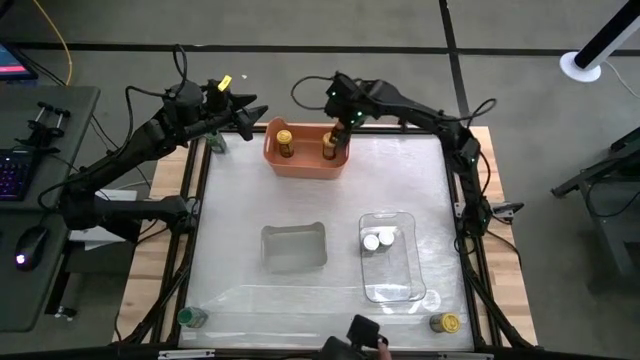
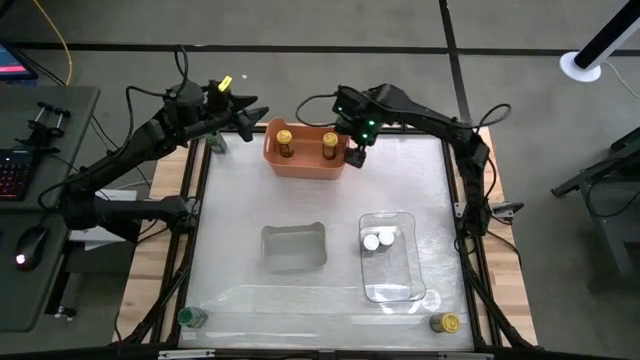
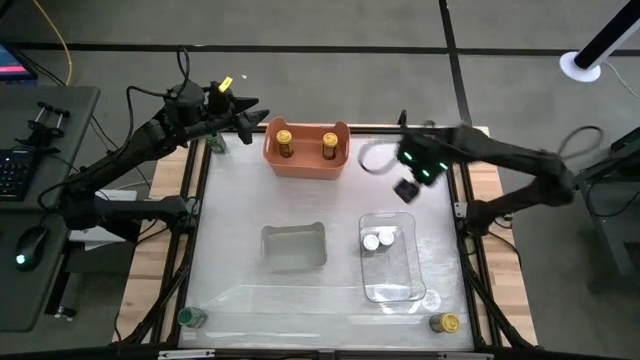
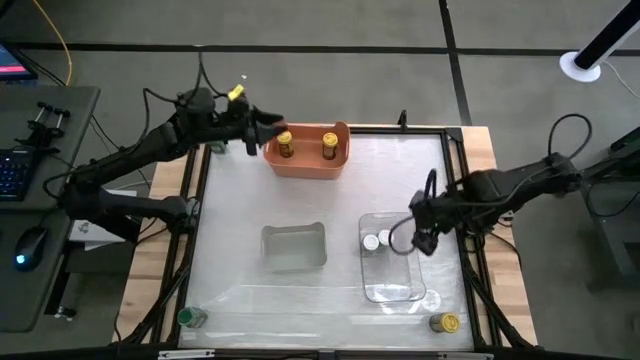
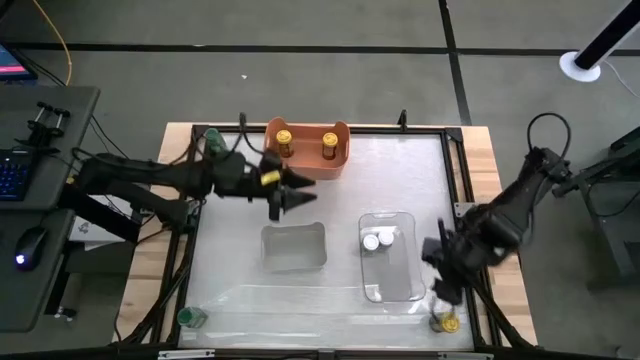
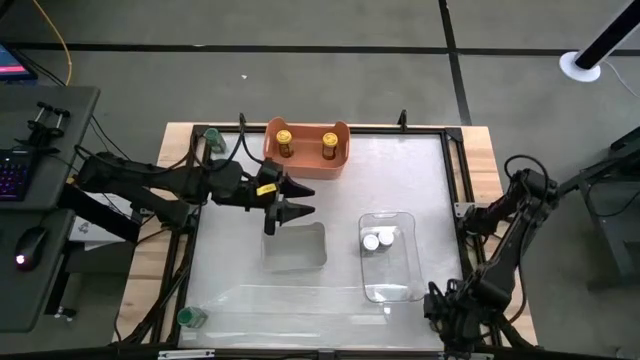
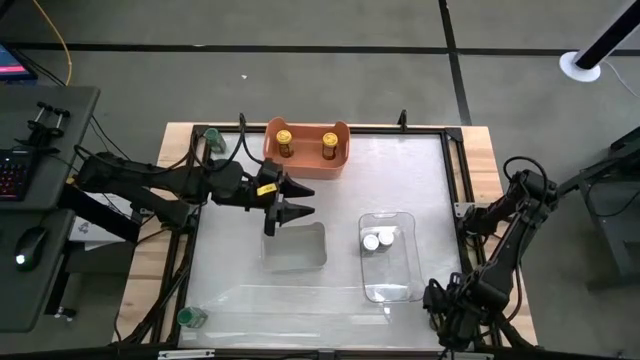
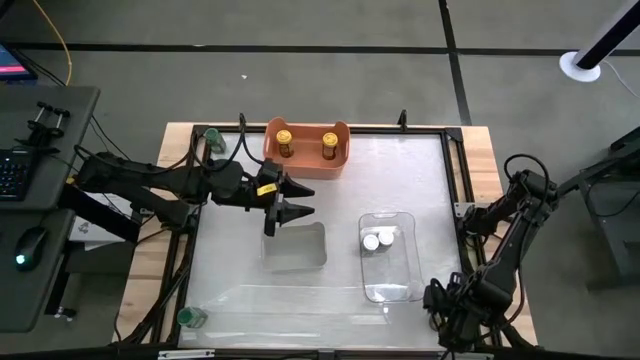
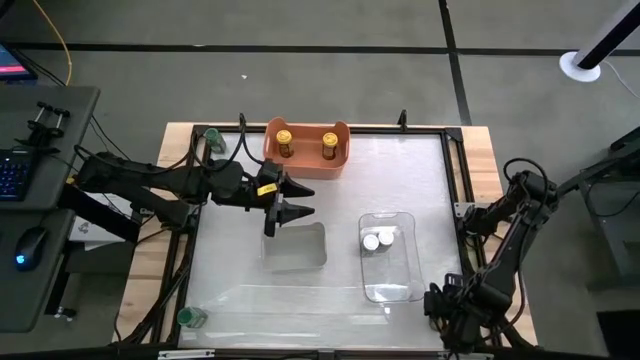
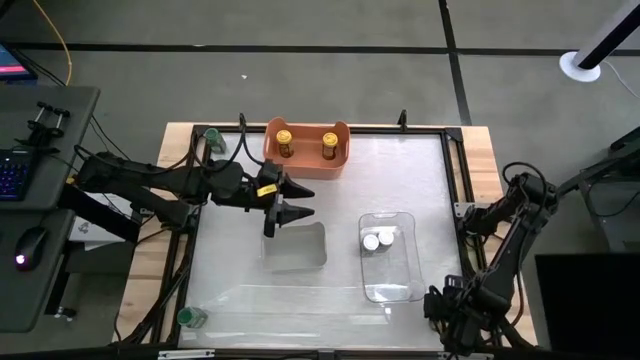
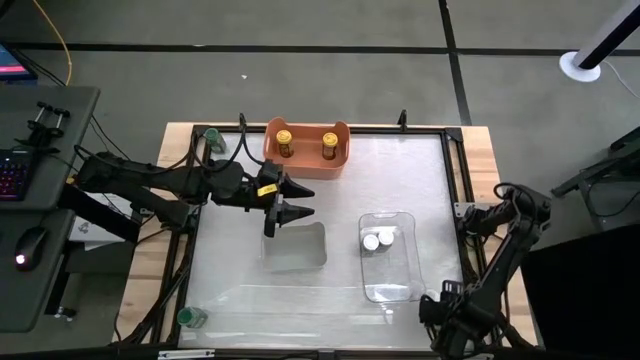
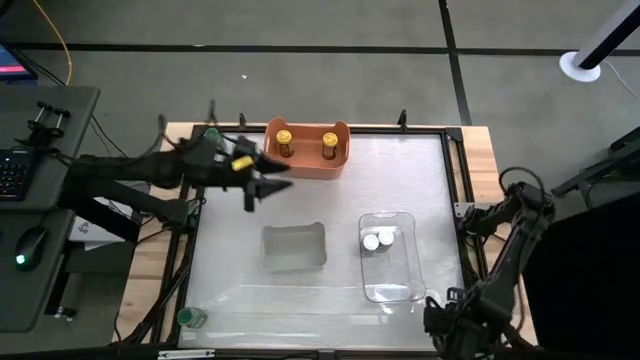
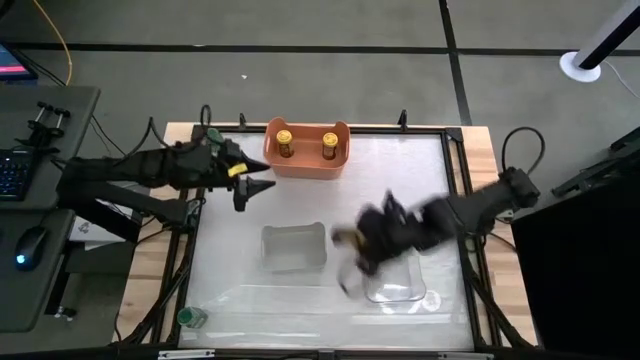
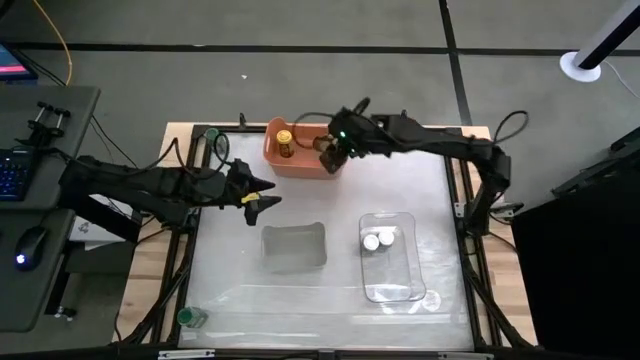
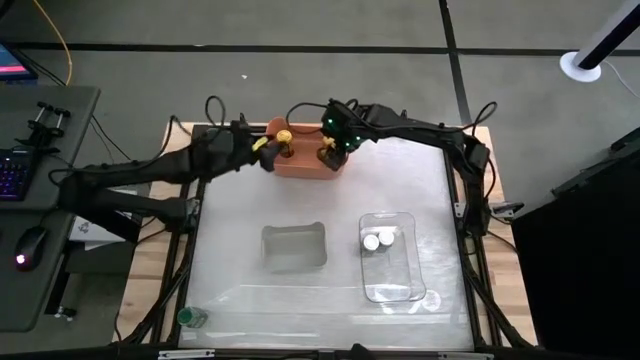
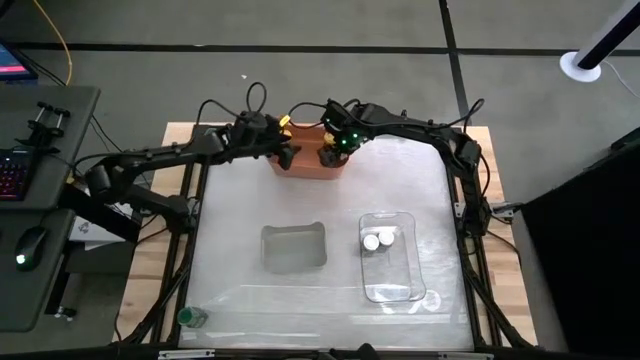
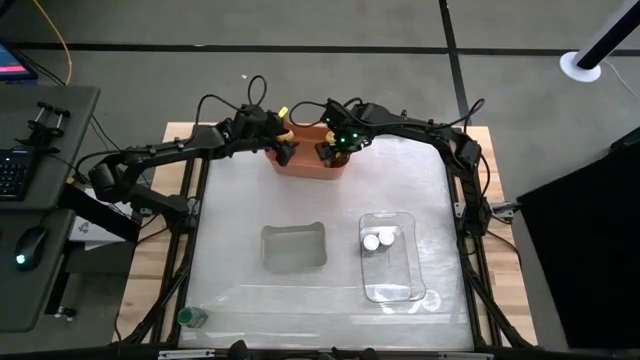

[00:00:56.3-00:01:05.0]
Task: Sort spices by type
Put the yellow seasoning bottle into the orange bin

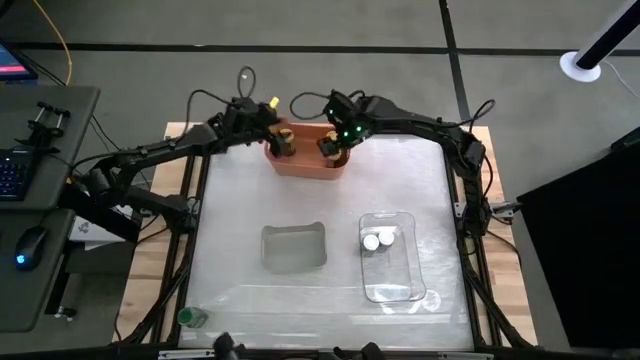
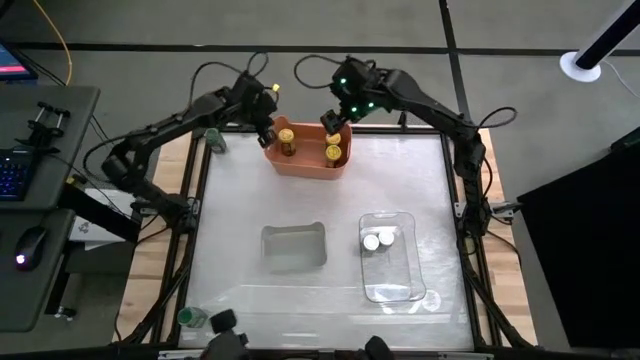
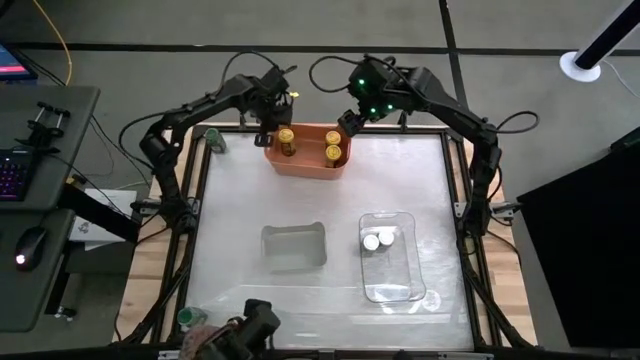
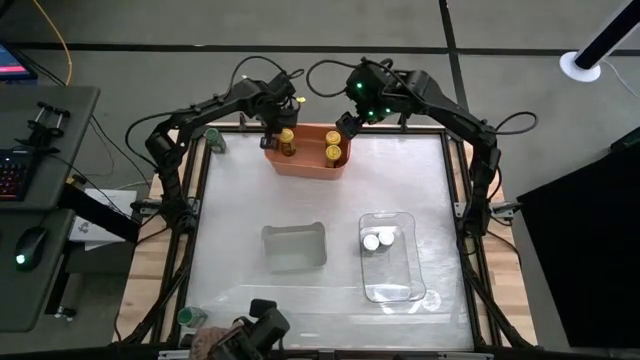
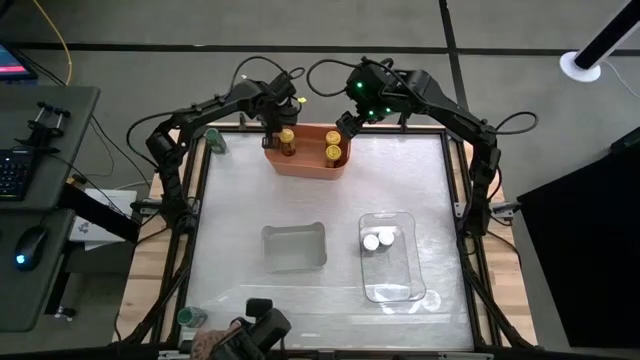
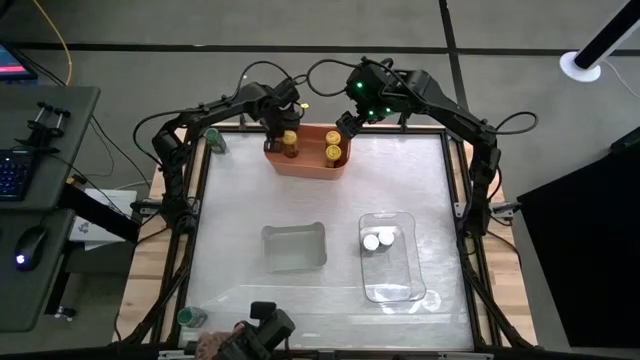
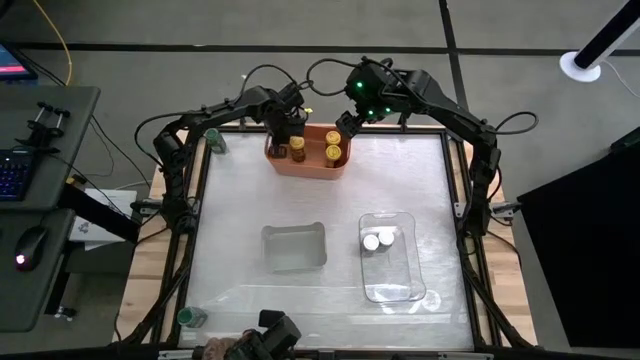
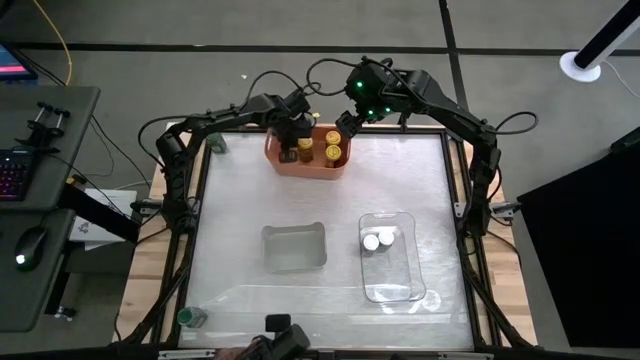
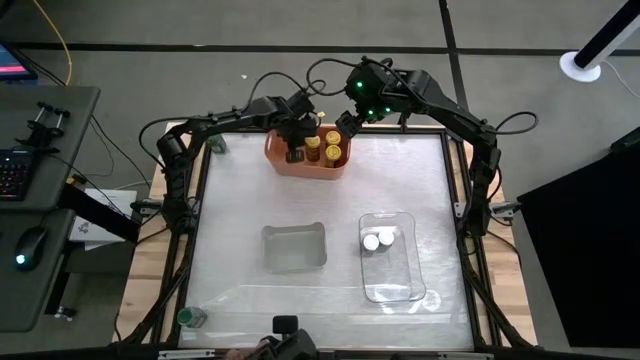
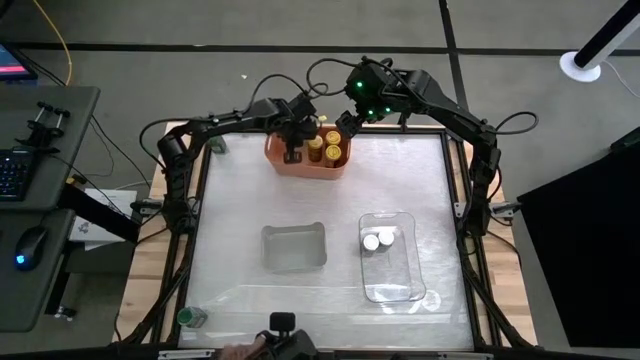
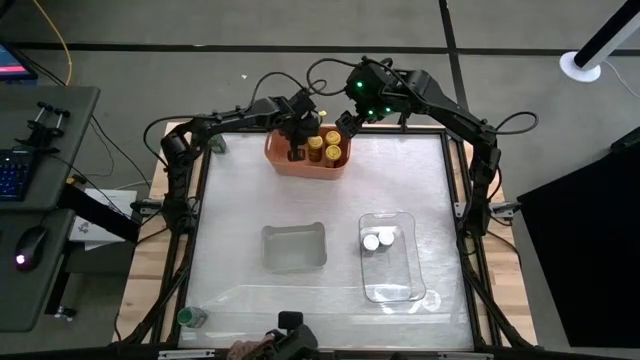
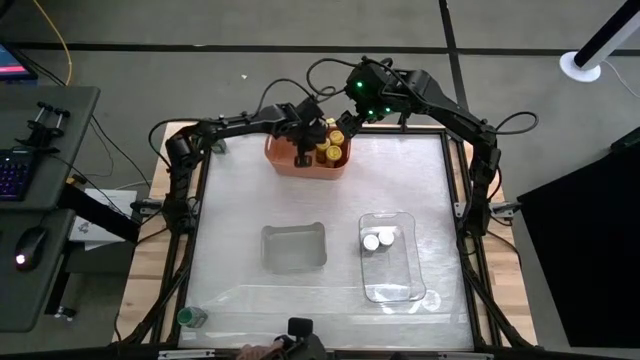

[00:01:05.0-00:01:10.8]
Adjust the yellow seasoning bottle in the orange bin

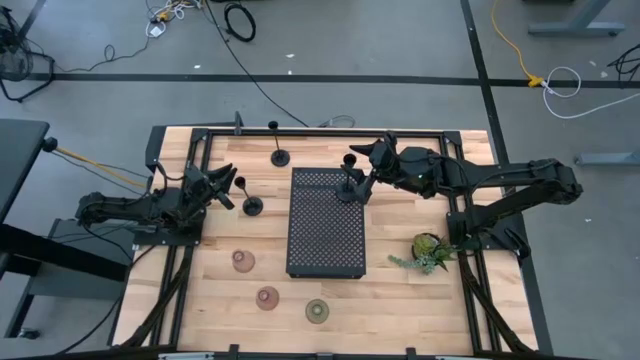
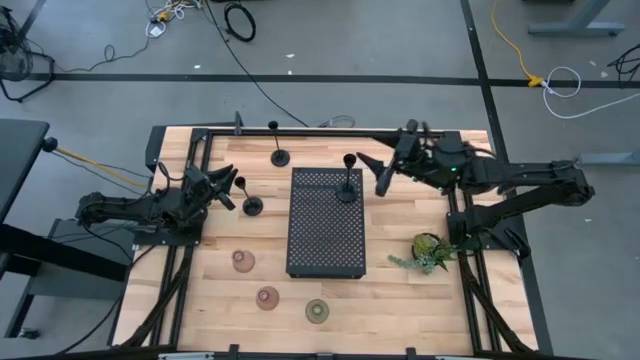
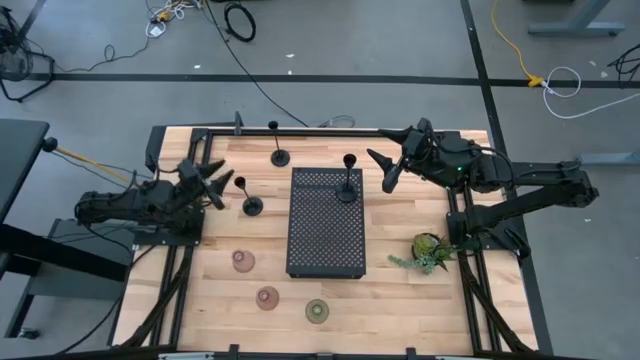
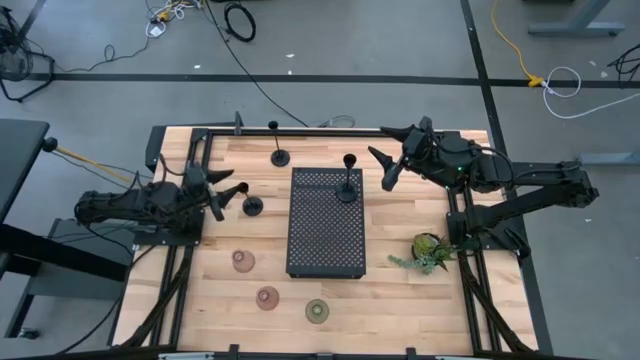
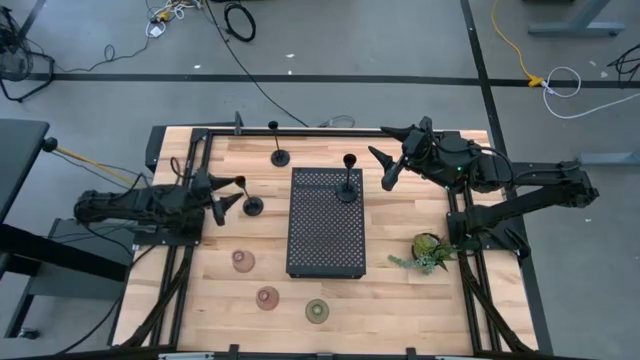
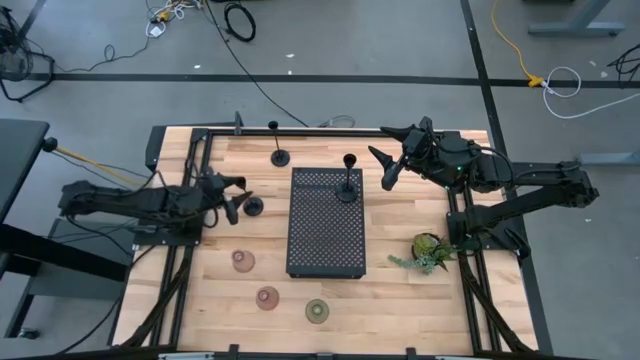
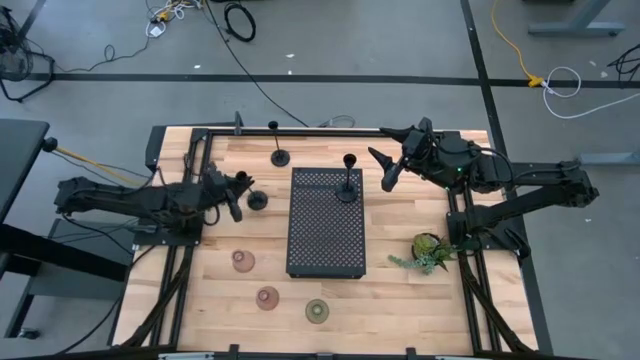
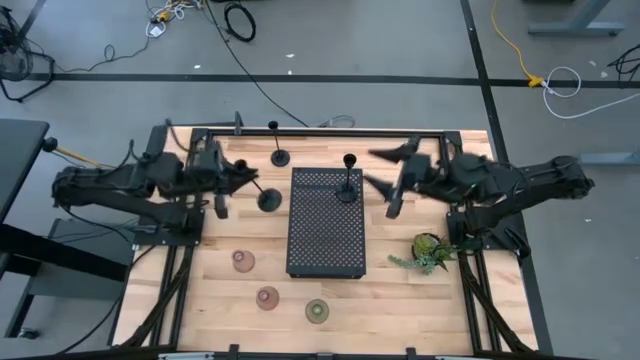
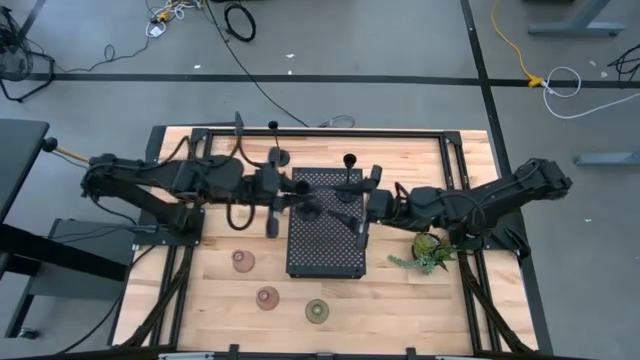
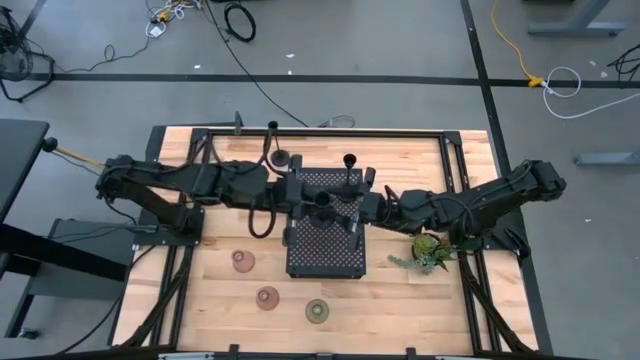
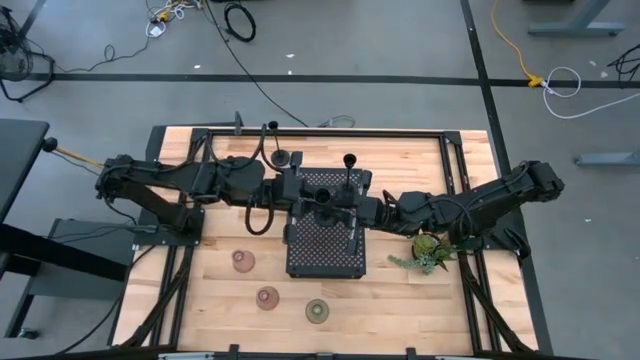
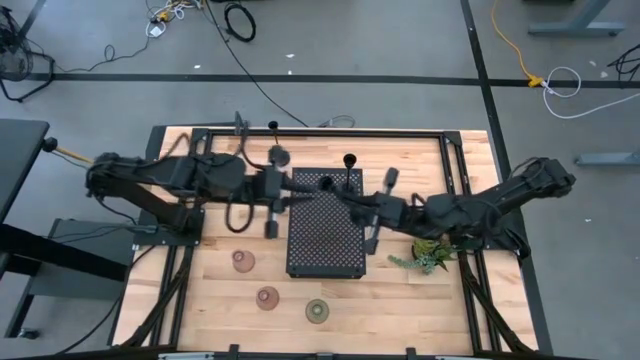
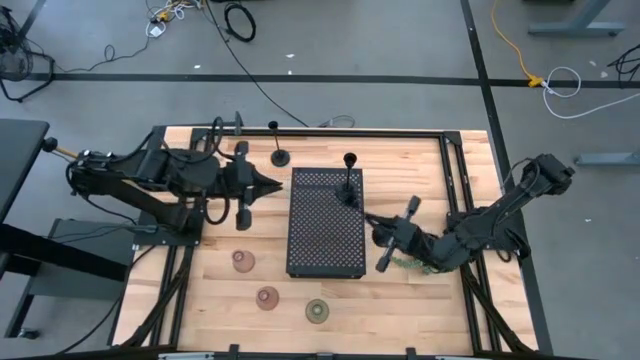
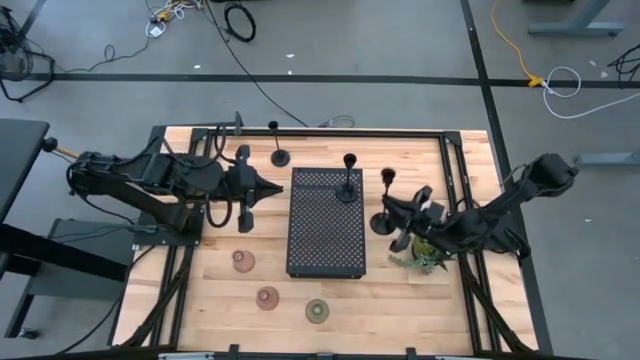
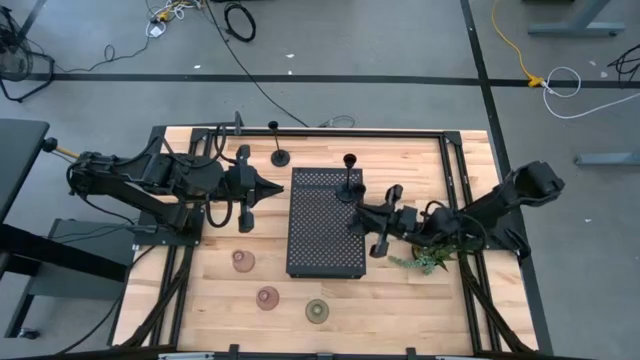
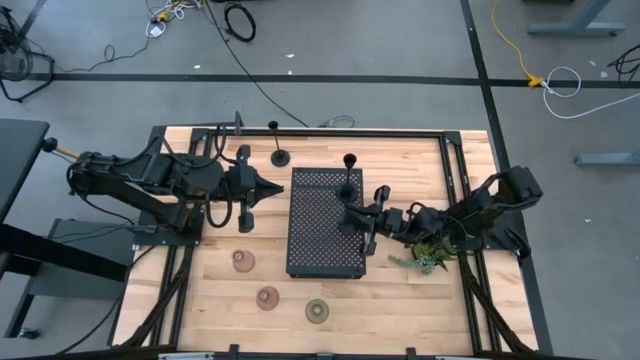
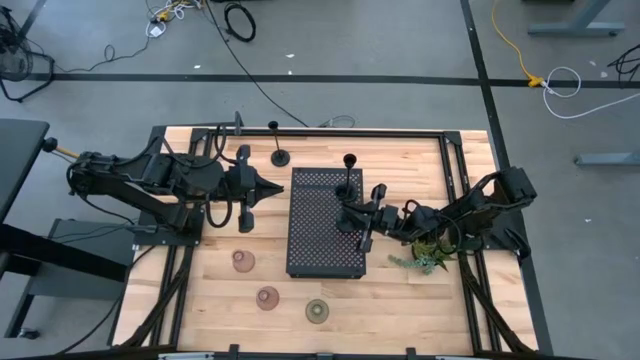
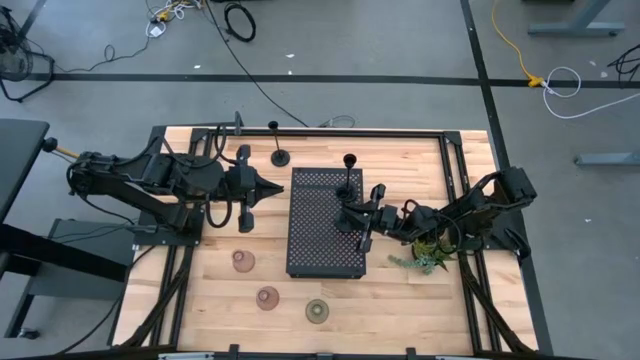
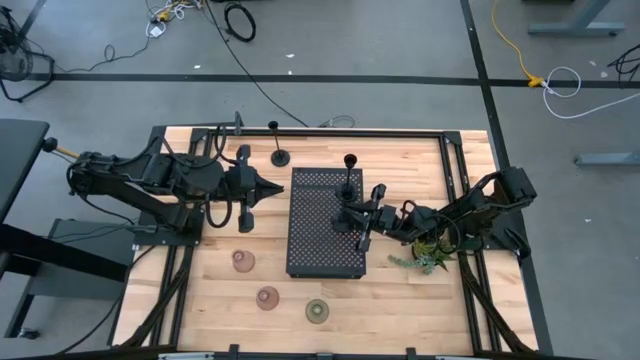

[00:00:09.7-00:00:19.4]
Task: Pick & Place candle stick holders
Put the bottom black candle holder on the shelf aligned with the other black candle holder
